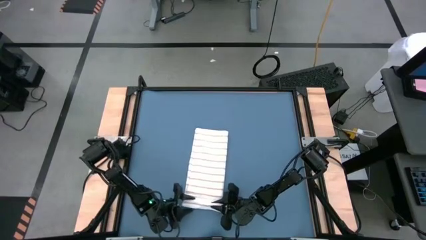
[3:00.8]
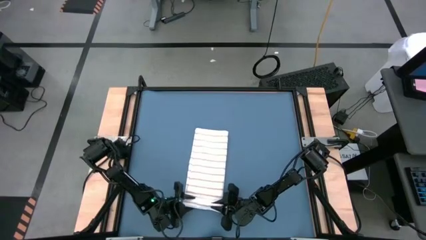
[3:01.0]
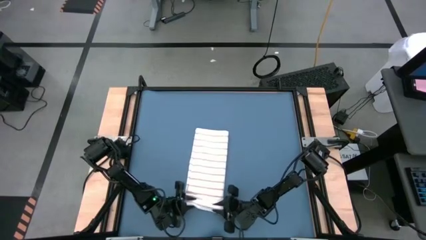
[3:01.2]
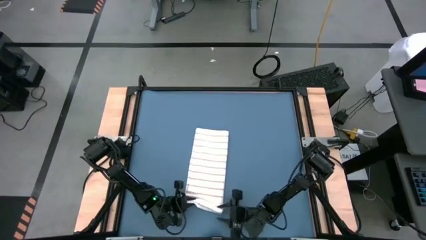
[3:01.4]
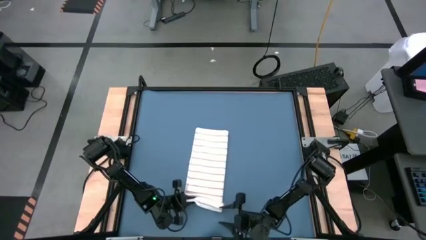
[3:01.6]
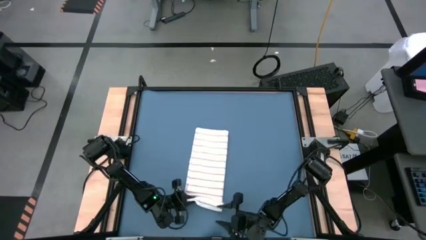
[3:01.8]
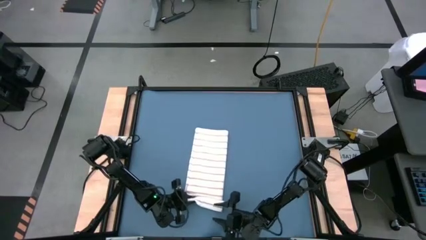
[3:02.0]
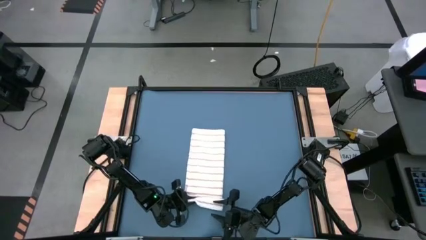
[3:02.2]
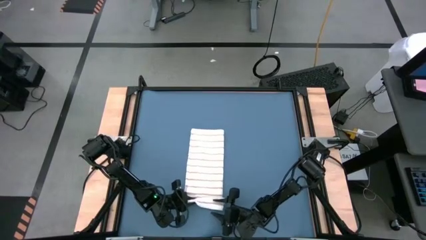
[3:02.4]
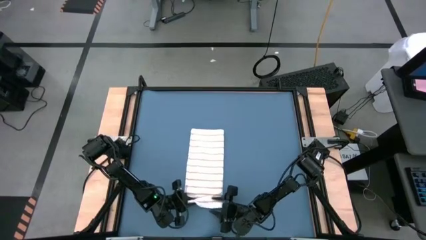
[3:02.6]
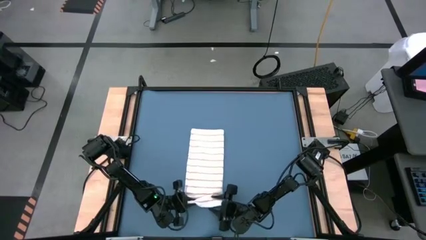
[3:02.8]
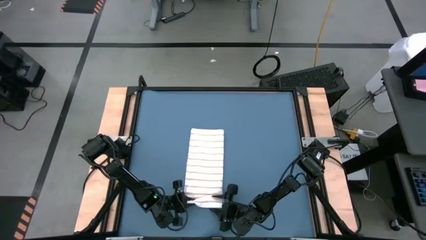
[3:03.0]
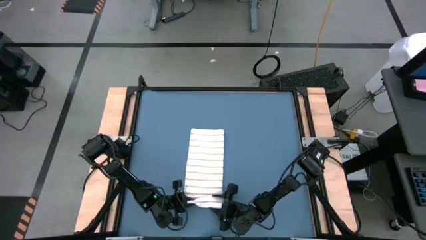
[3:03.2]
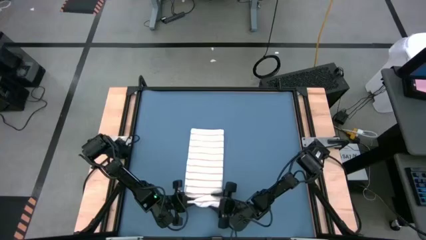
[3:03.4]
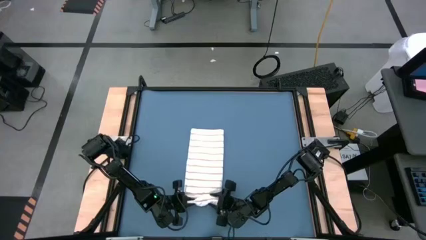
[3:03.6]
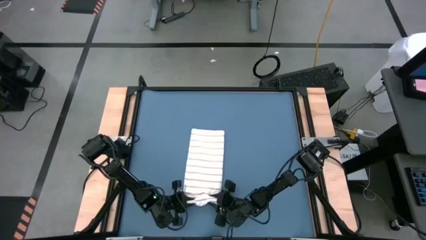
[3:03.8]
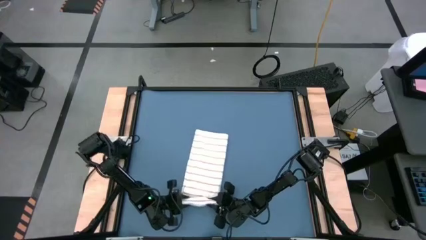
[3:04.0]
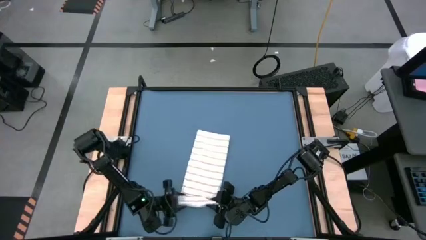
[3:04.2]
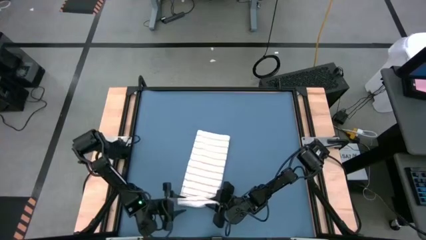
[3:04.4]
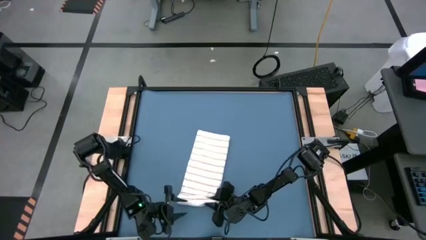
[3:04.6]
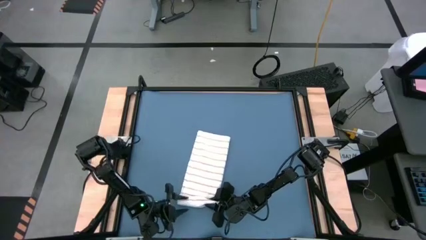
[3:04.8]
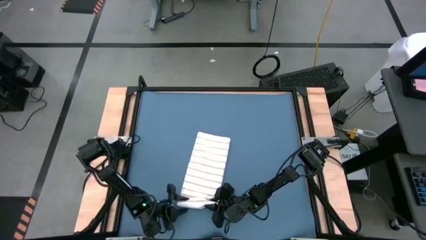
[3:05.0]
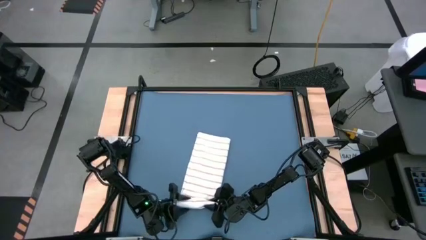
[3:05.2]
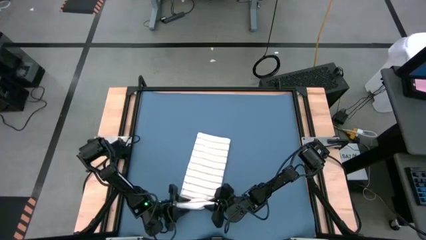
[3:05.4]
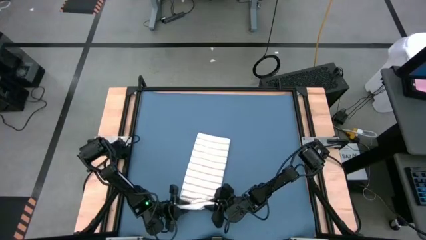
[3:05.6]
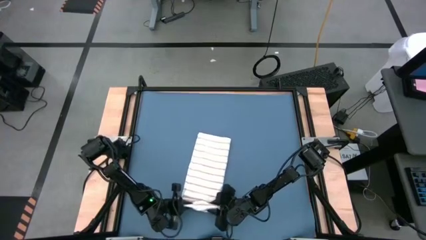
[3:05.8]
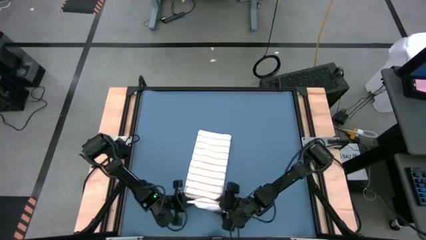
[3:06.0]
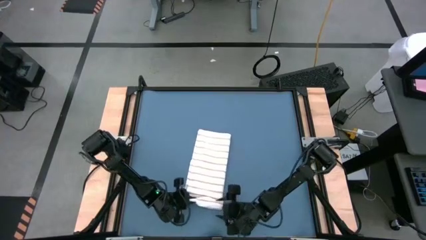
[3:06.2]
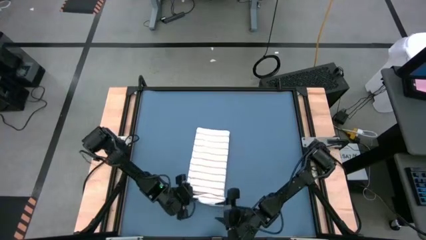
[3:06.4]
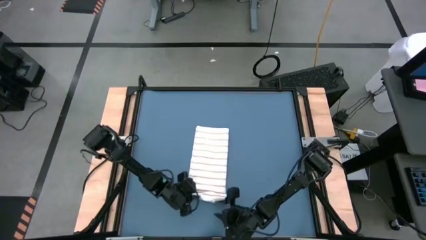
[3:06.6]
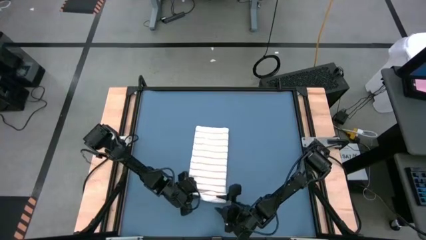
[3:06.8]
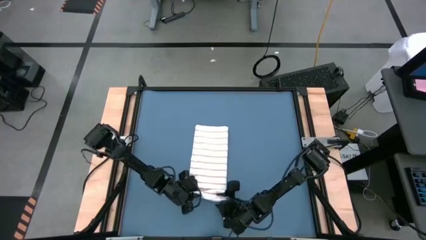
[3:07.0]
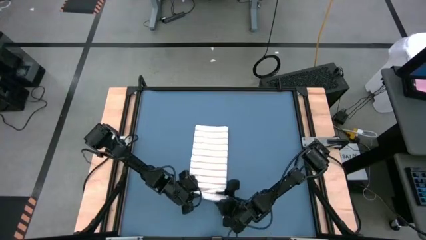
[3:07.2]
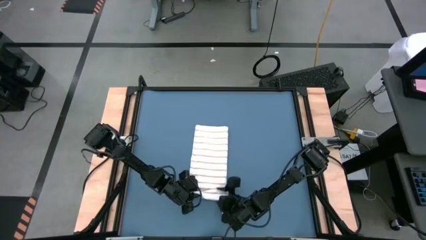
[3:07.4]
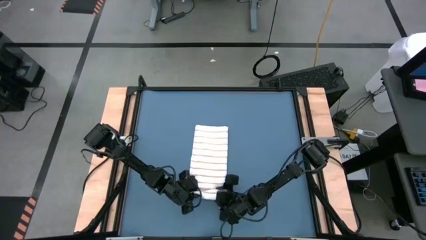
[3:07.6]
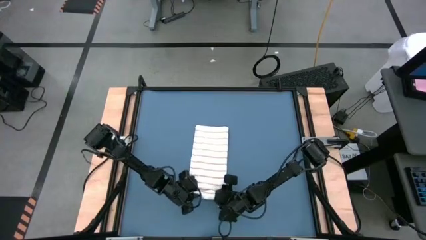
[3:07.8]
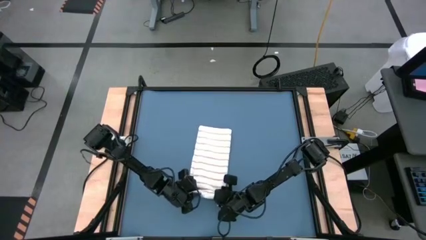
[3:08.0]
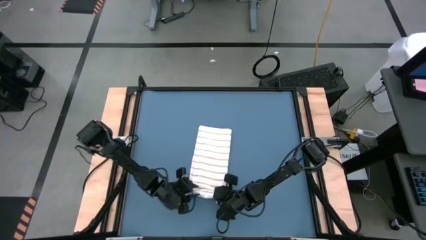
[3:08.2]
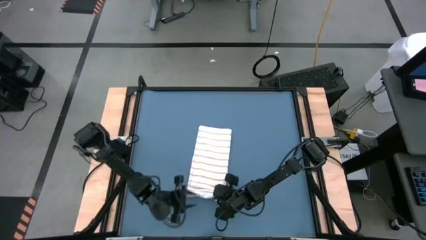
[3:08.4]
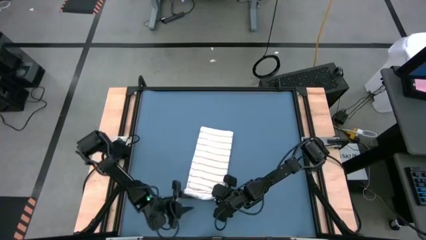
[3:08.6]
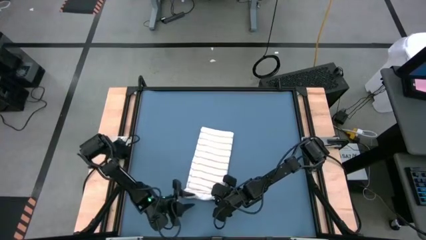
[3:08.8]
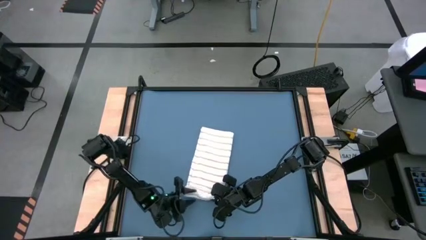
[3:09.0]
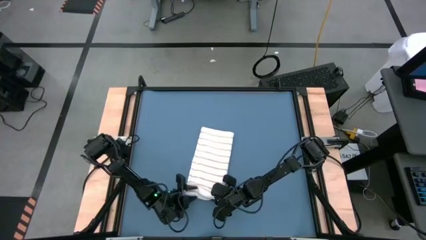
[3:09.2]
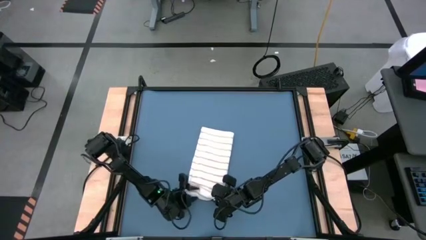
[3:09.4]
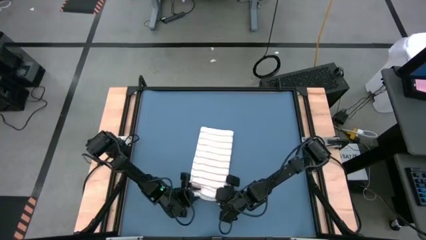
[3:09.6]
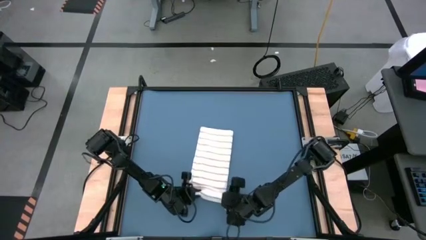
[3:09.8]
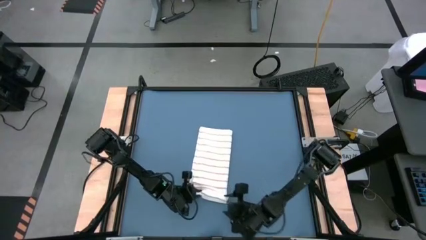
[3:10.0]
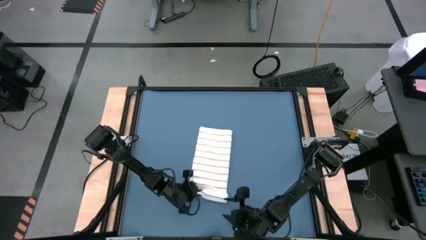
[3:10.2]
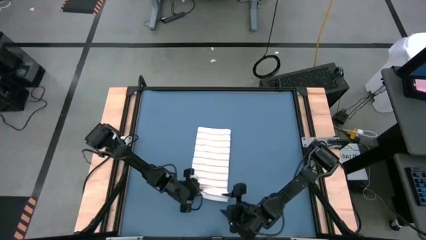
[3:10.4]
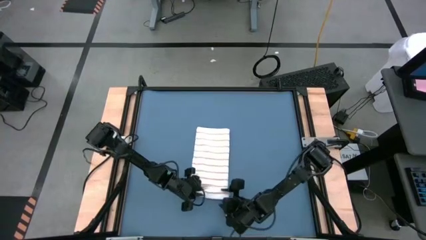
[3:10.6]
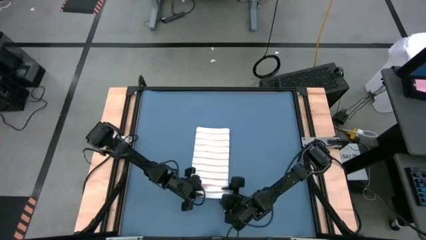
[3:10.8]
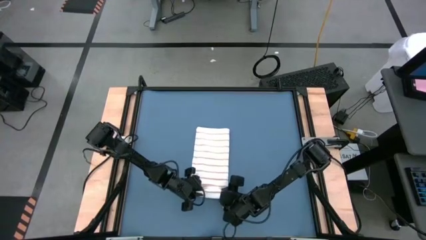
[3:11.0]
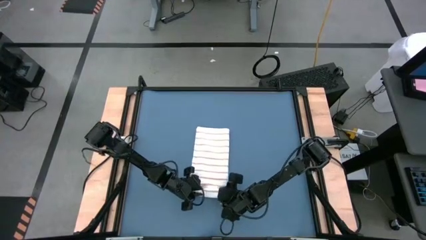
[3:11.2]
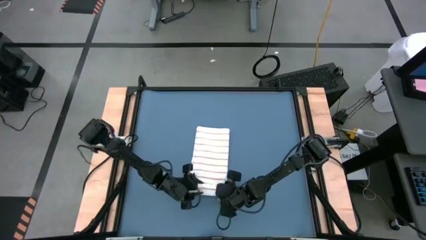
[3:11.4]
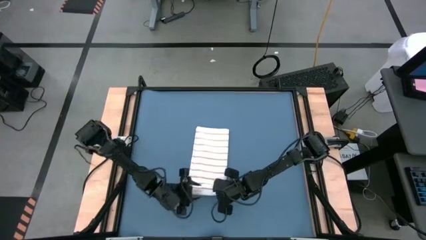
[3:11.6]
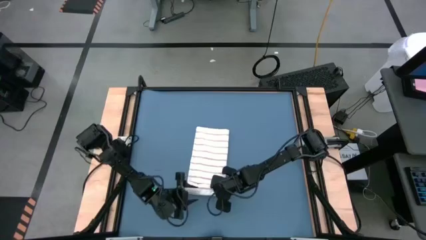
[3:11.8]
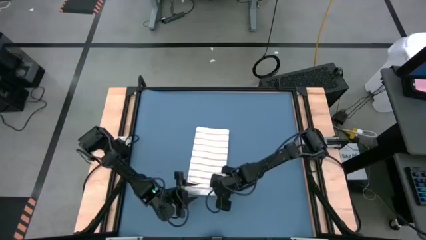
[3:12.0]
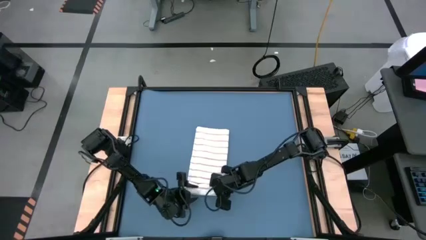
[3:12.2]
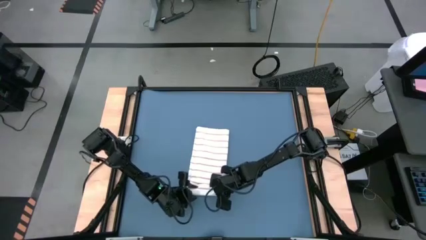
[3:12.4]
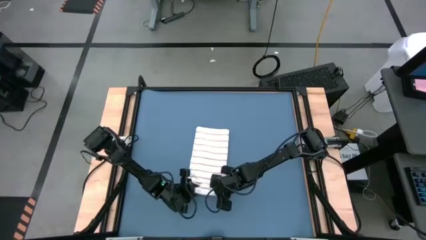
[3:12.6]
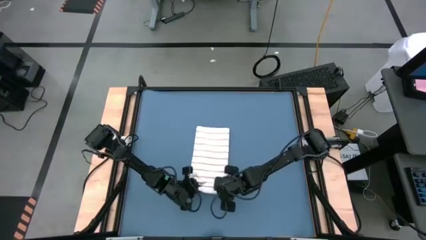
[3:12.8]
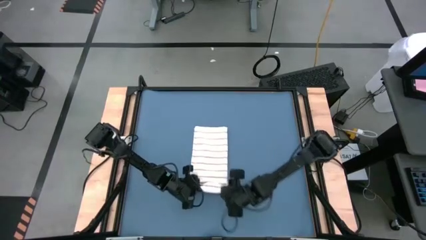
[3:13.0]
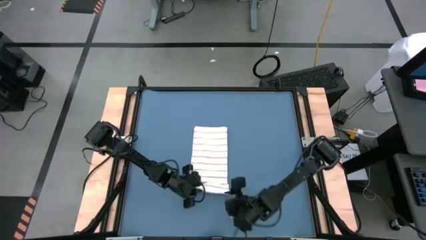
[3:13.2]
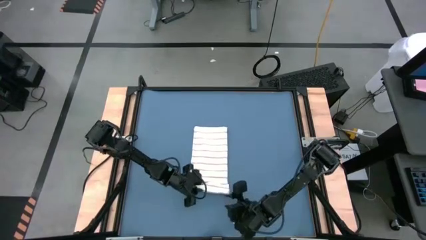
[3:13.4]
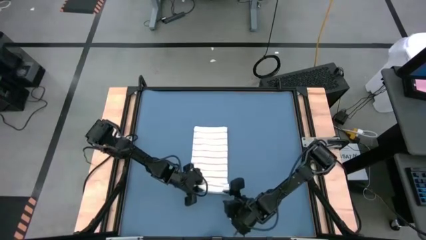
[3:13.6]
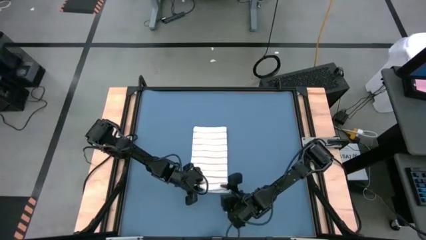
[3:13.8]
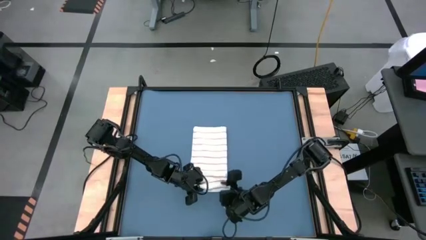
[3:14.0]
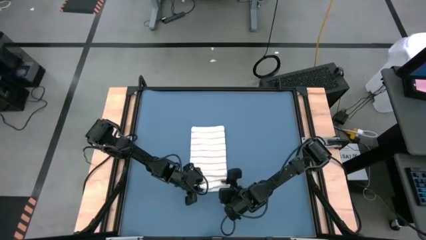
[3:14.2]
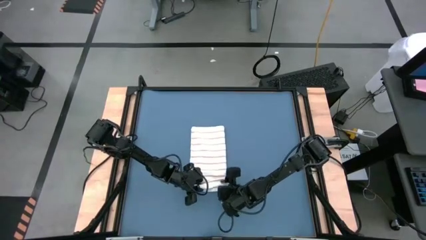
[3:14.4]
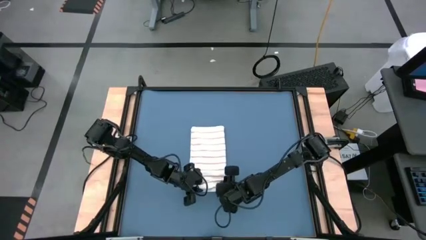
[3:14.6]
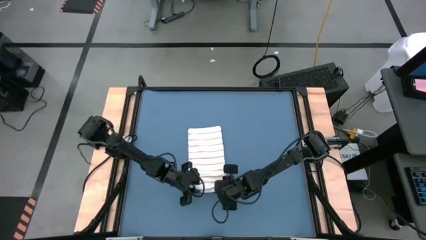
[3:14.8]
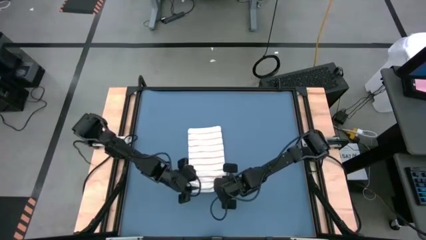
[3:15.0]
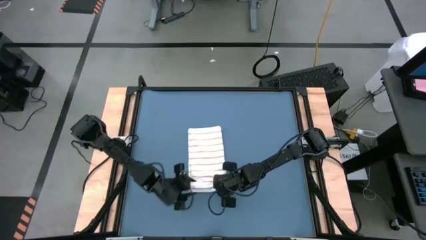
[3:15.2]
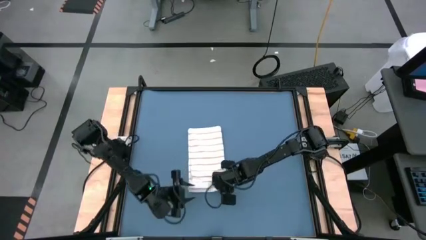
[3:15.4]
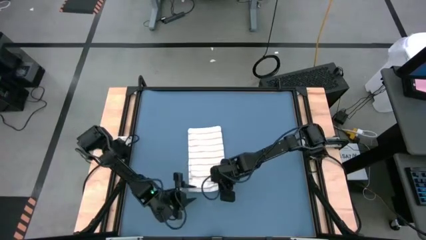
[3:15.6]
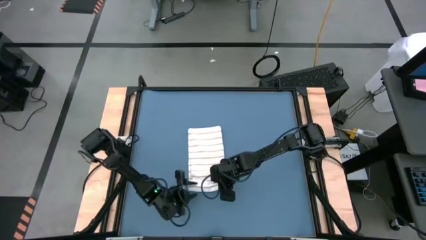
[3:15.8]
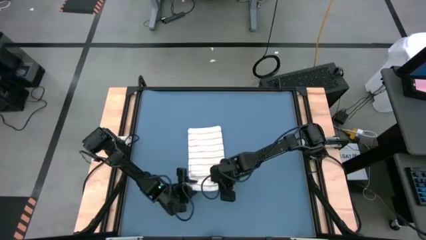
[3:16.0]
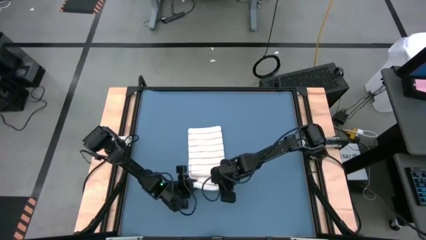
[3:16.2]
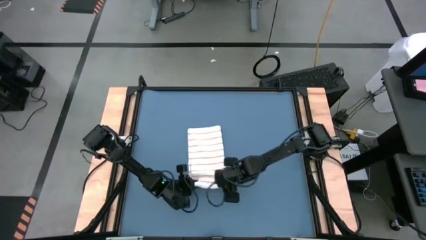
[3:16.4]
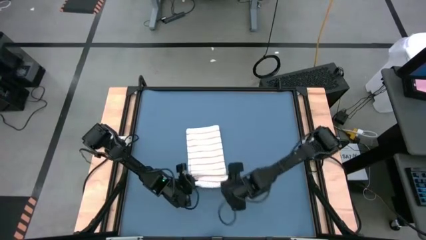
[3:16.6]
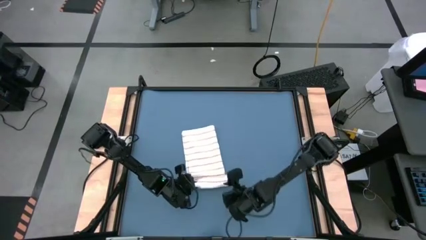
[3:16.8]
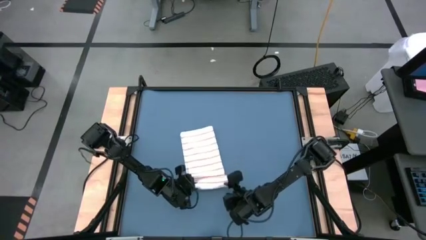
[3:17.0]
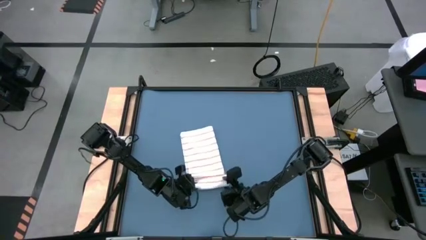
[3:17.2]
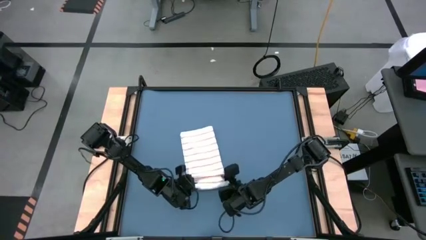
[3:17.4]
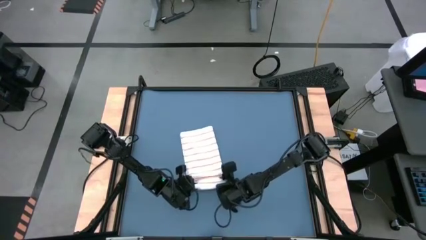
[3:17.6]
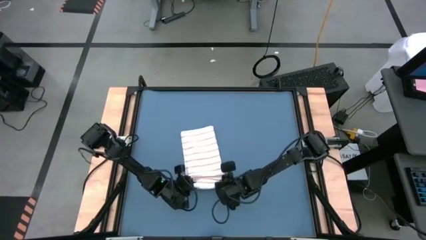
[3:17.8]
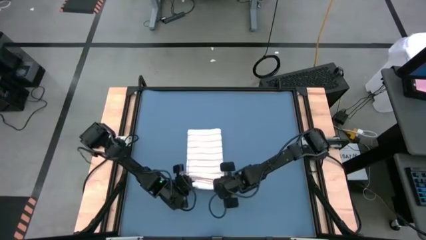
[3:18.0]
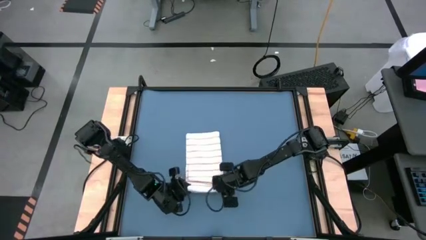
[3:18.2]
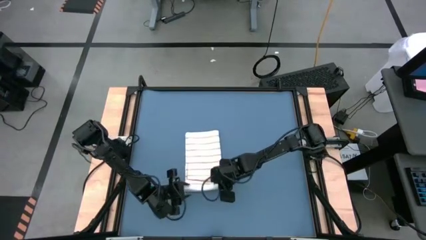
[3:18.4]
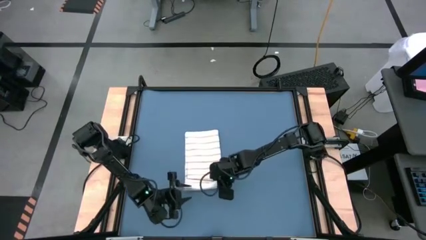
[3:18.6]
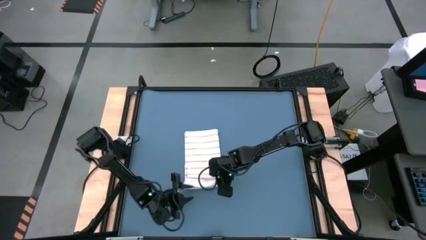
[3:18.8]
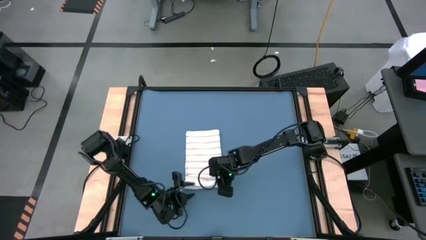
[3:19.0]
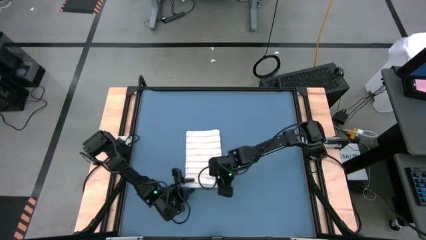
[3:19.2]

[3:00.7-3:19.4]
Task: Roll towel
Roll the white towel
